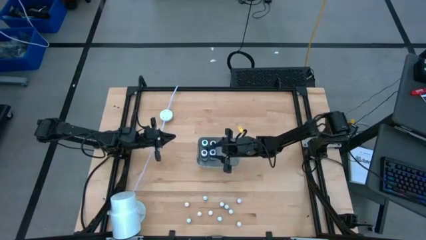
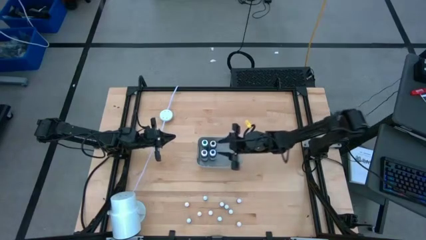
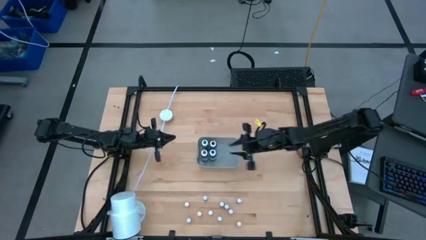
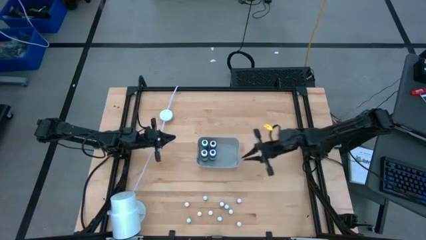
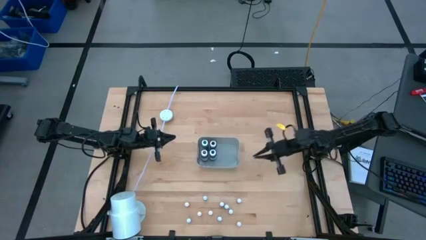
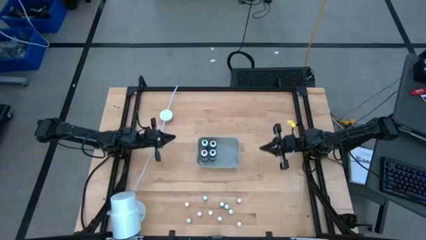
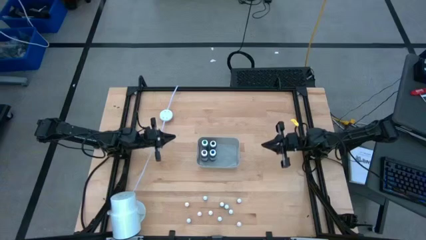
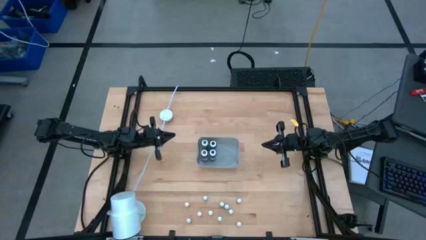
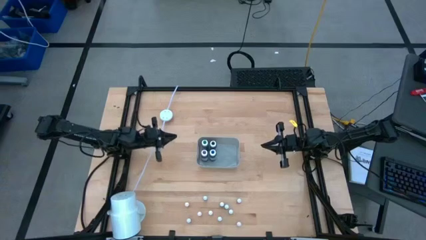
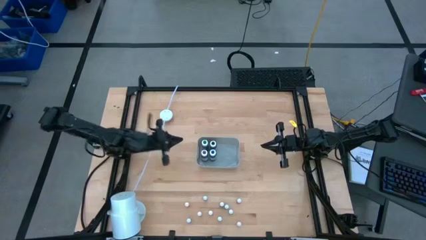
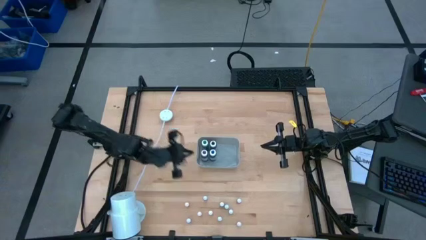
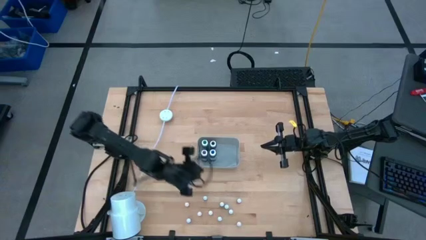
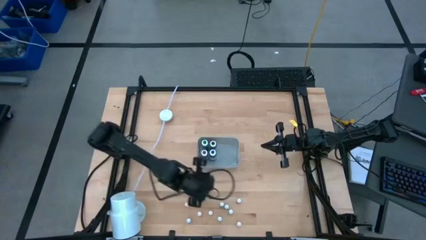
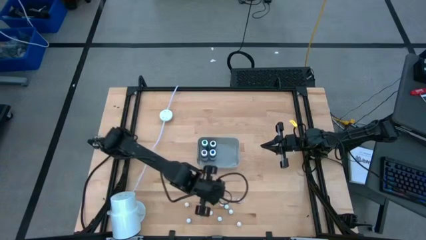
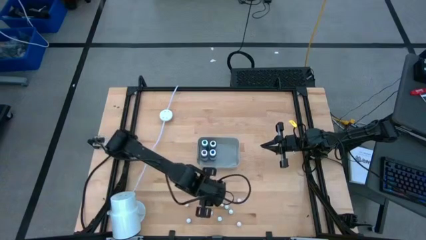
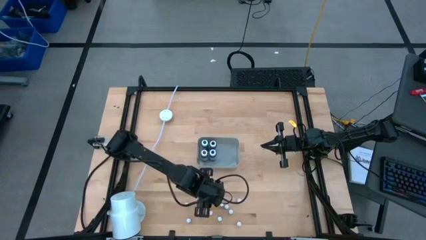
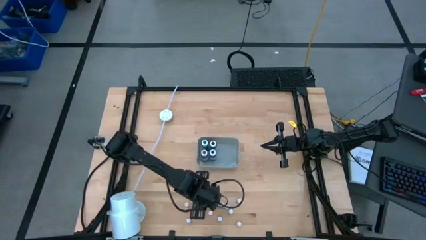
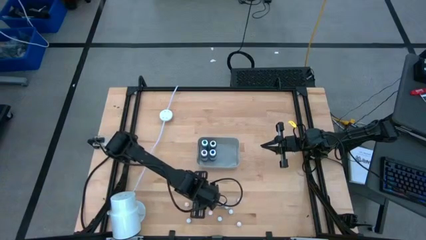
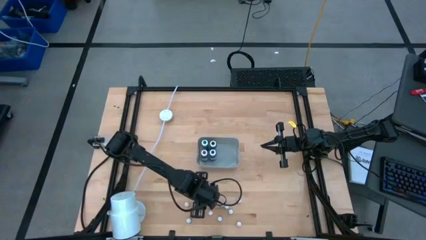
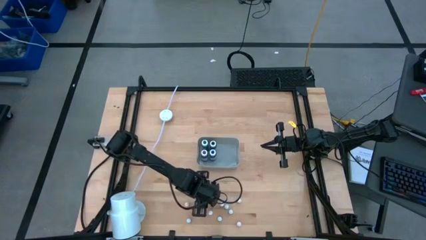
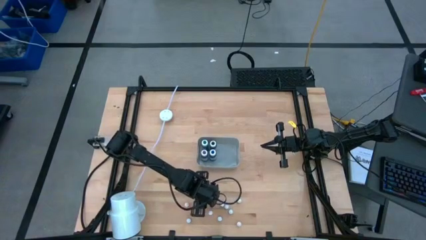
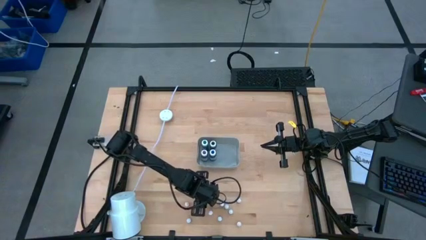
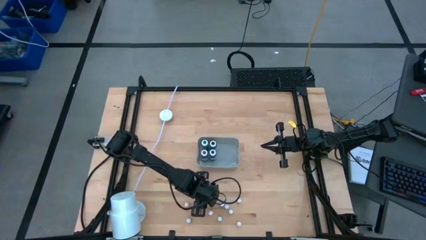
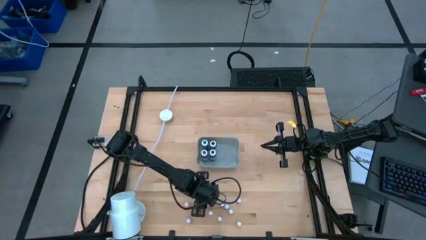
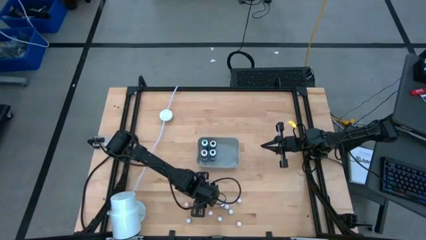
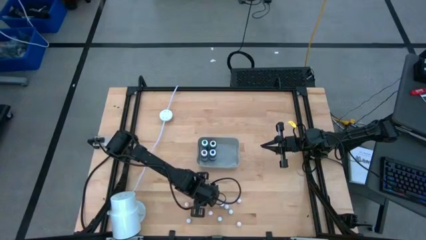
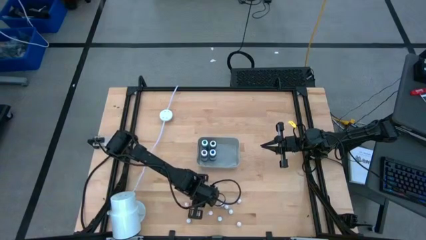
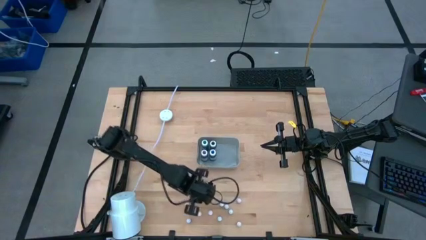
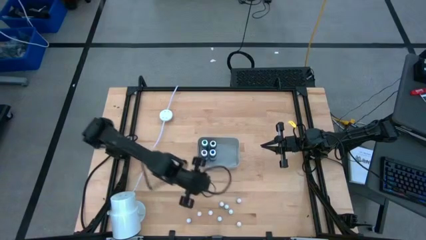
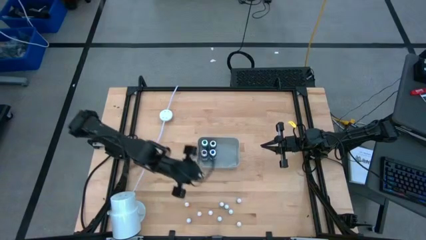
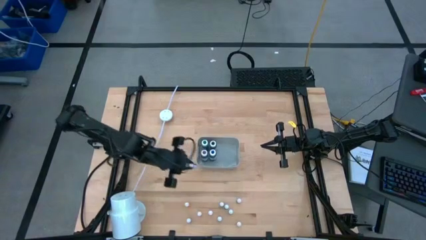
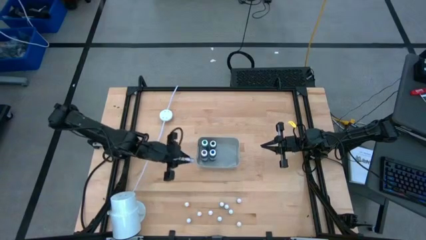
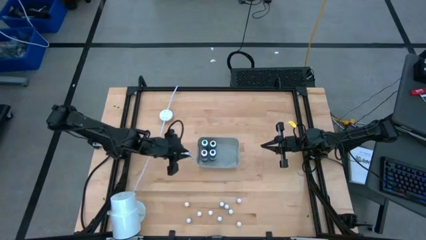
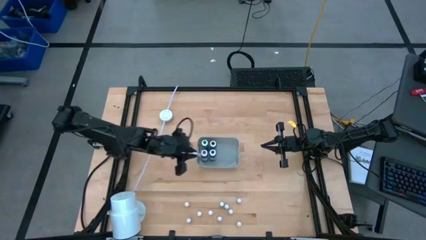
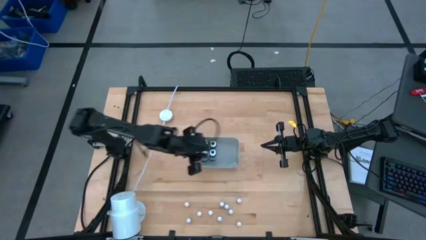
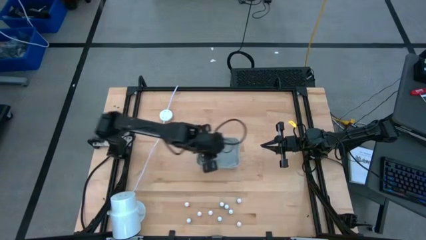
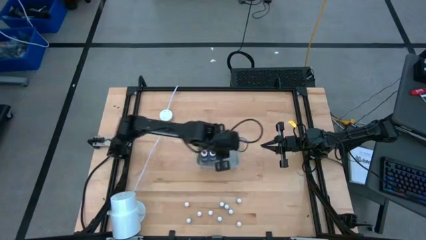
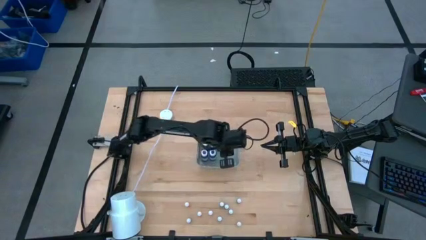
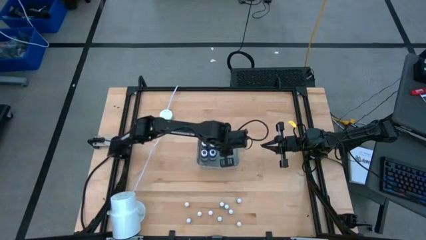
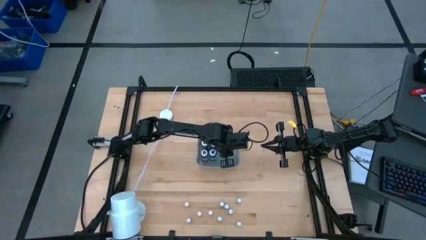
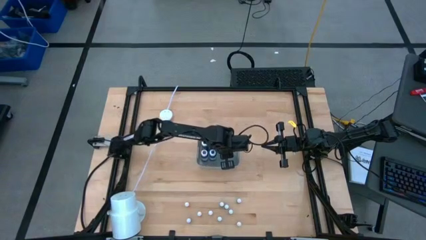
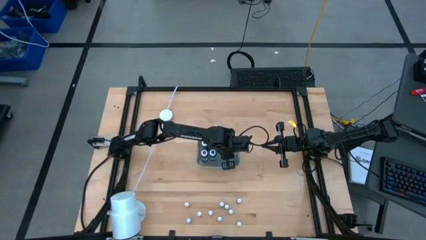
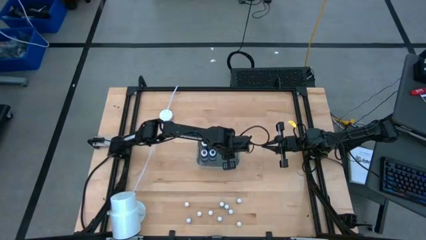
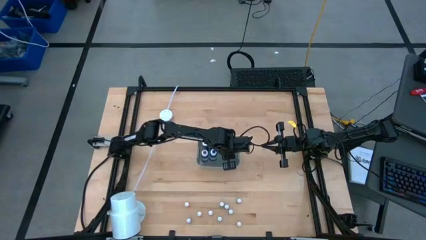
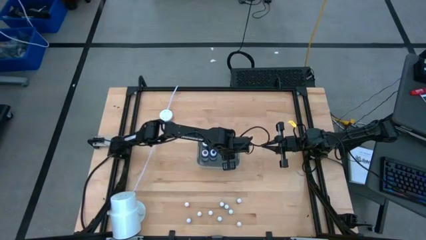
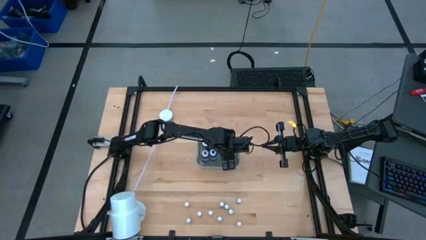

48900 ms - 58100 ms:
Task: Pick & Place food coloring
Put the small blue food coloring bottle into the gray container

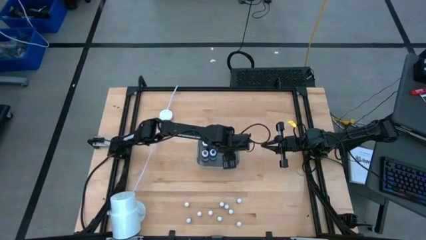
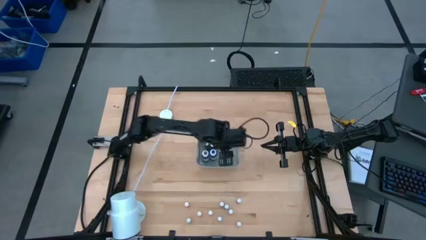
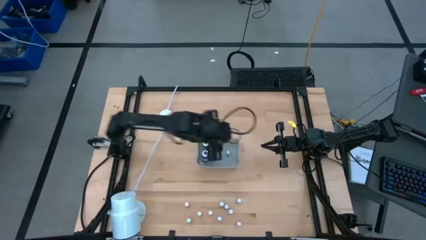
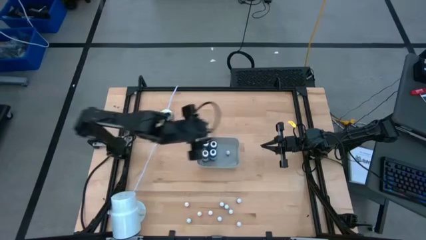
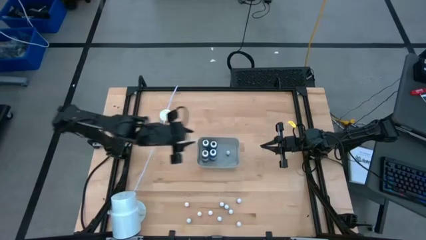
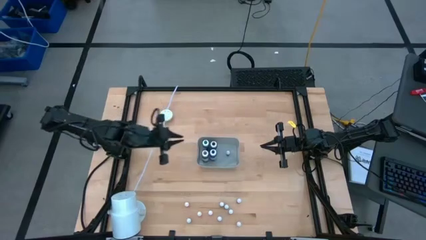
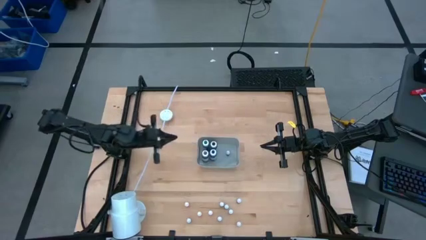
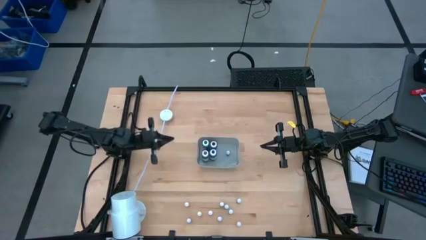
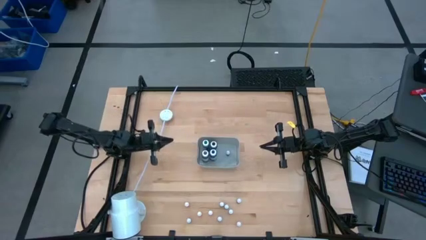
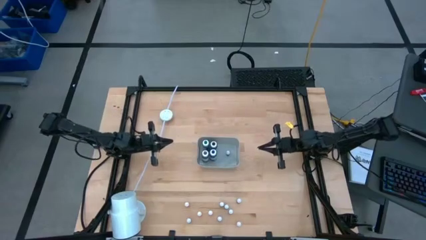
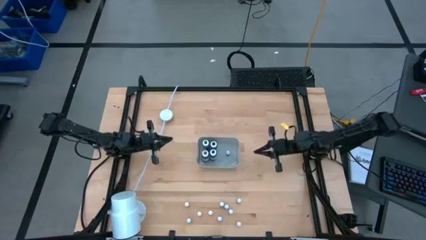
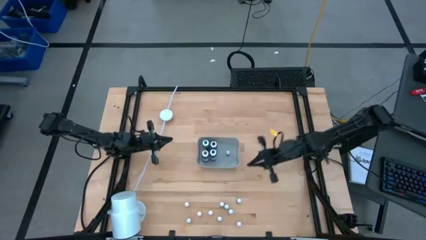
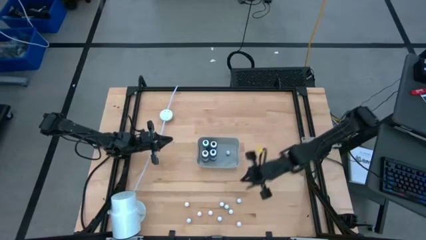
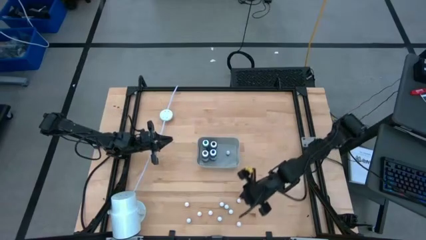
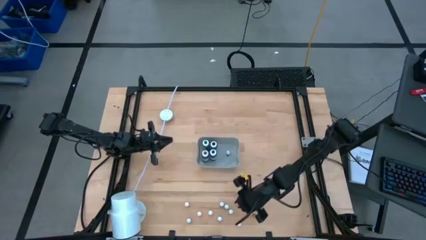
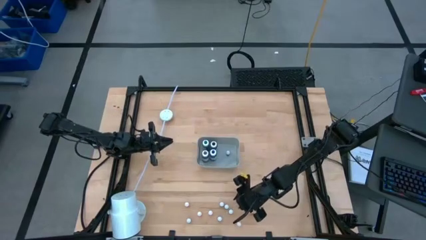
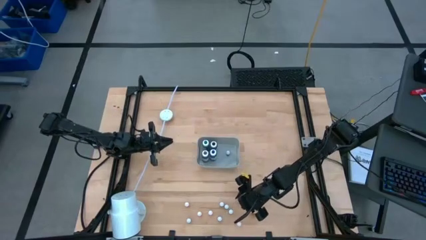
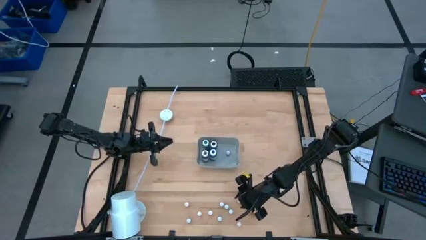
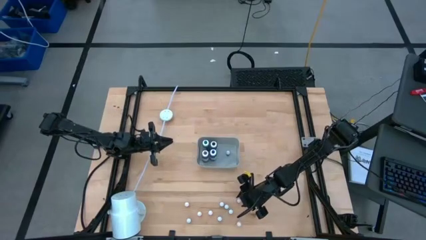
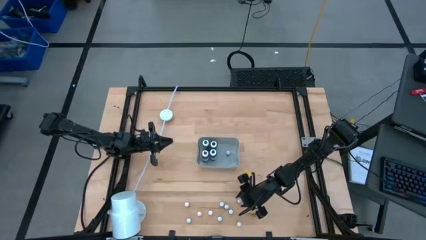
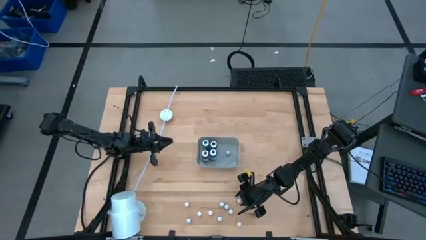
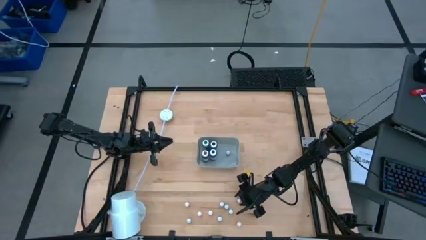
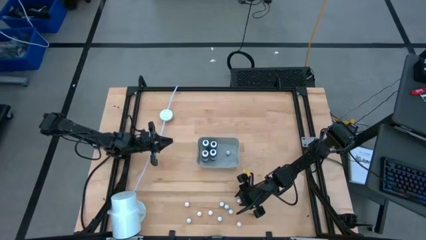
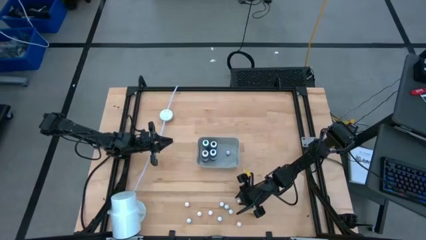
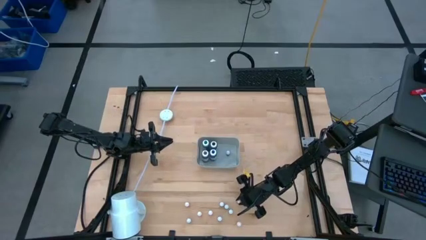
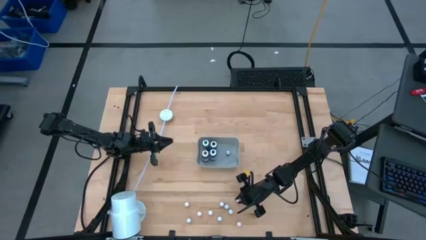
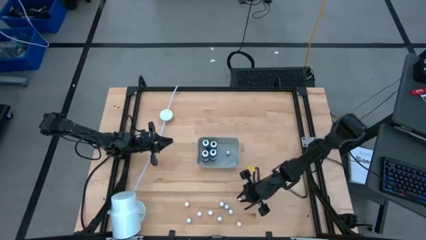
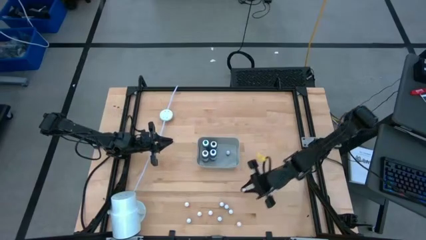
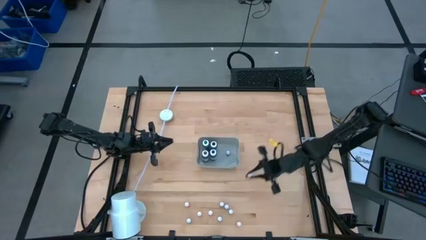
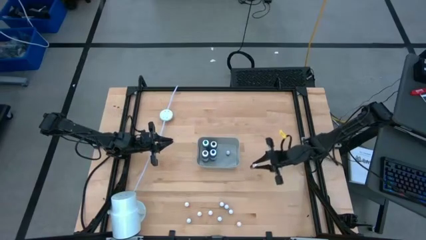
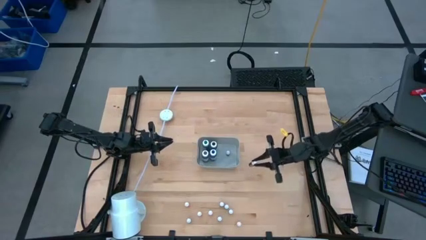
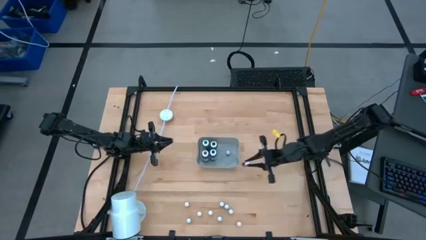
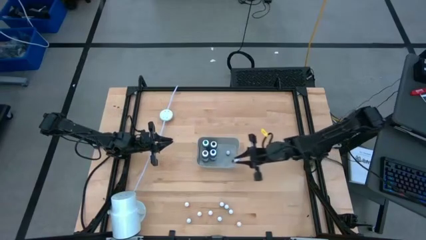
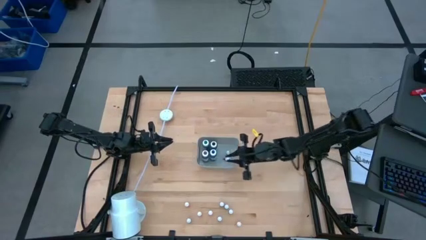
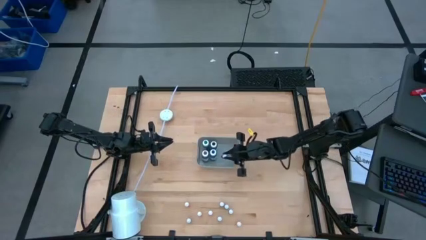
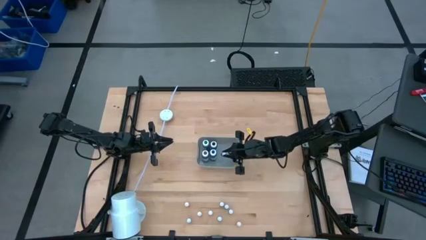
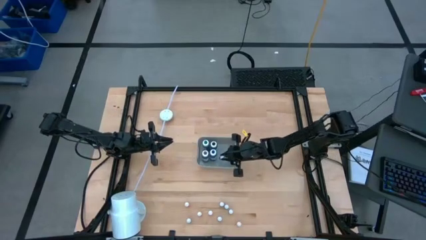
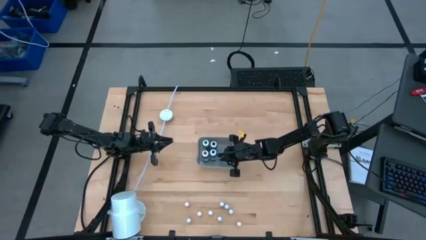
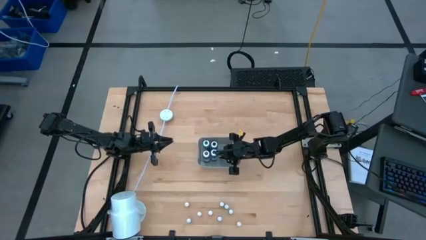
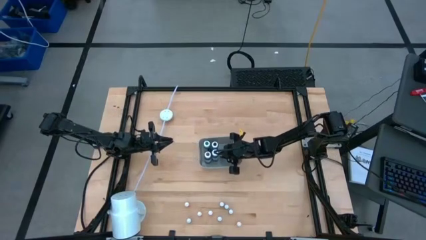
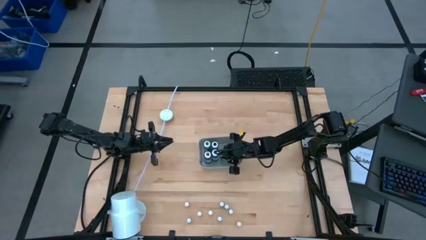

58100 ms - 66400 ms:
Put the small red food coloring bottle into the gray container

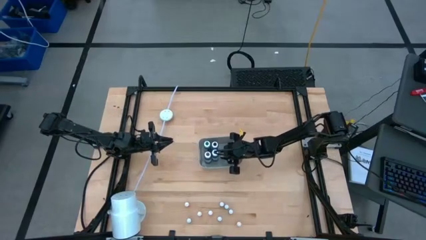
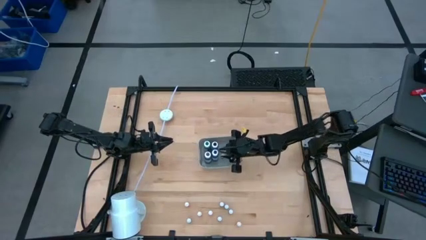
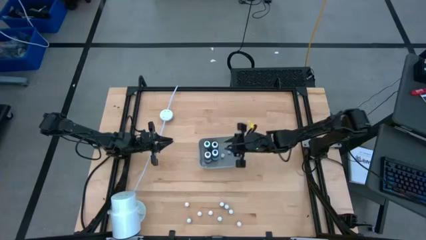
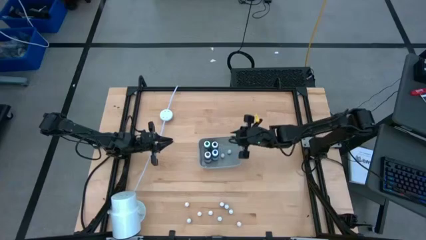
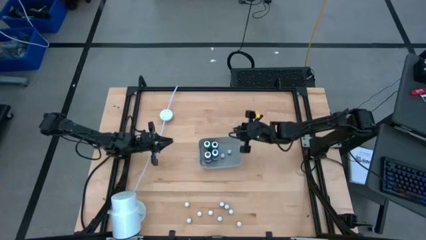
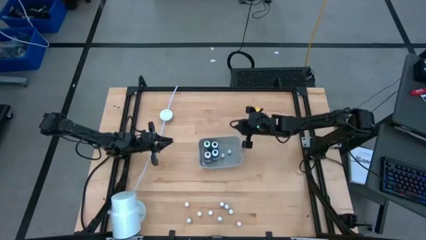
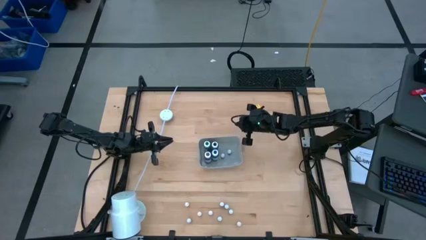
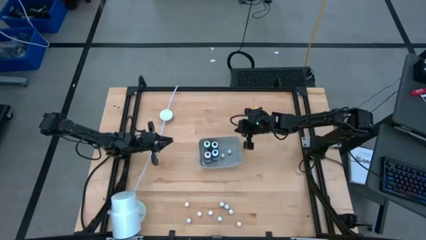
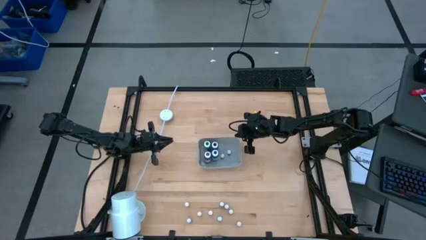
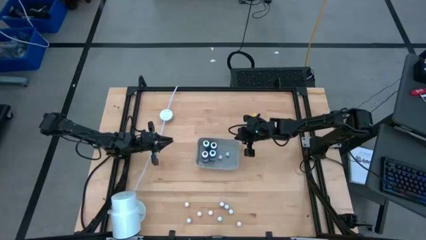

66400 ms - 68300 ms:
Adjust the gray container
